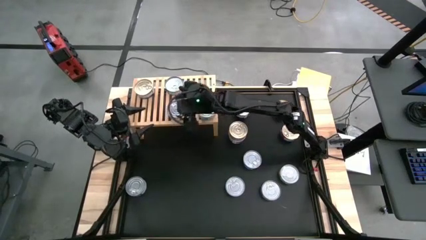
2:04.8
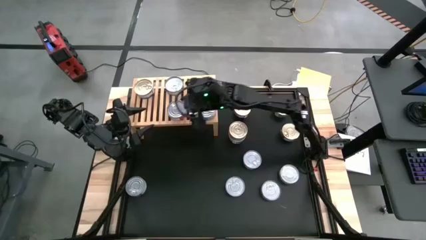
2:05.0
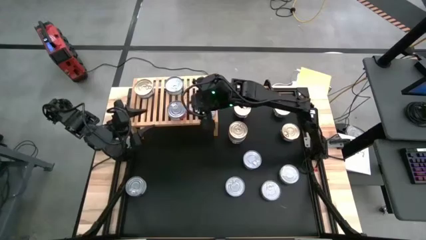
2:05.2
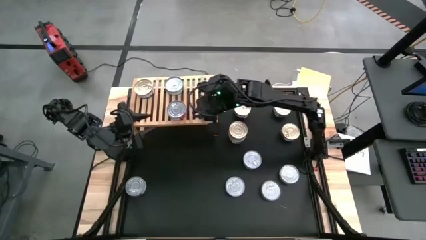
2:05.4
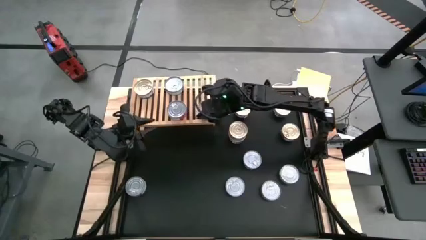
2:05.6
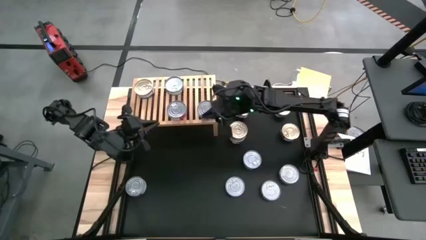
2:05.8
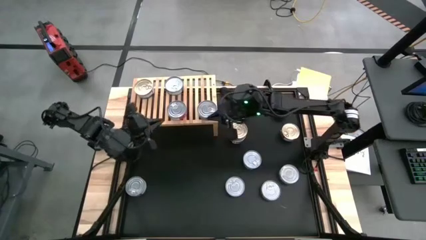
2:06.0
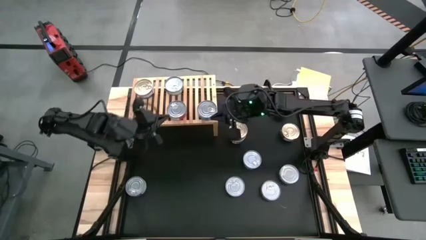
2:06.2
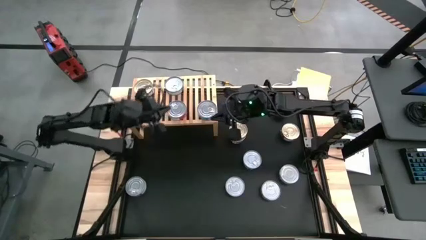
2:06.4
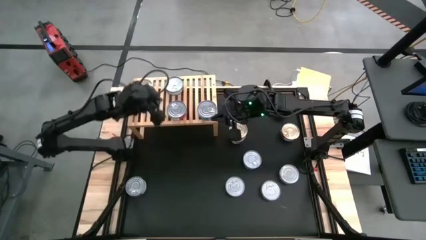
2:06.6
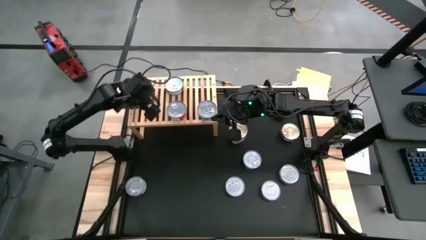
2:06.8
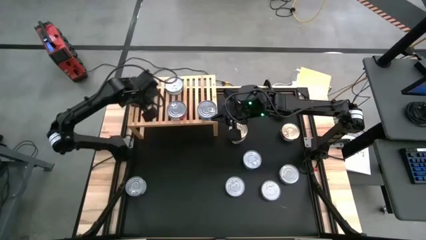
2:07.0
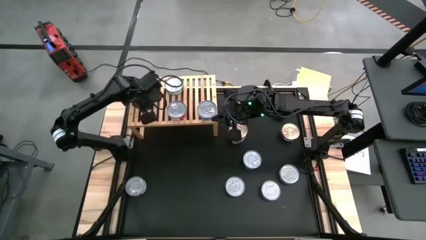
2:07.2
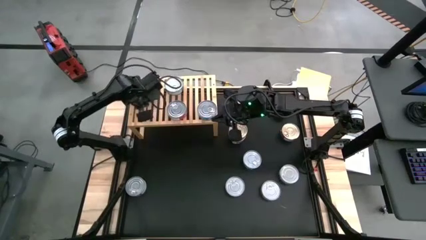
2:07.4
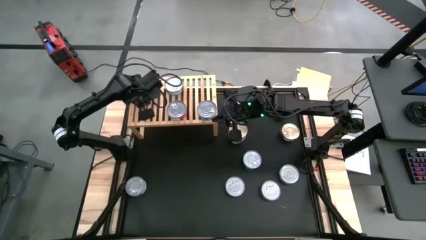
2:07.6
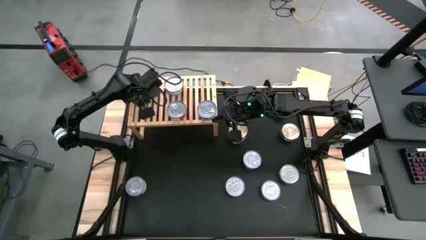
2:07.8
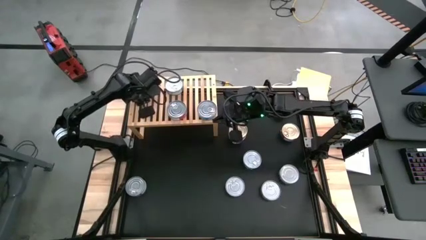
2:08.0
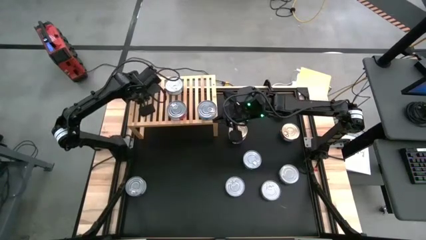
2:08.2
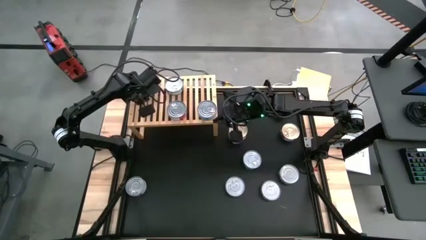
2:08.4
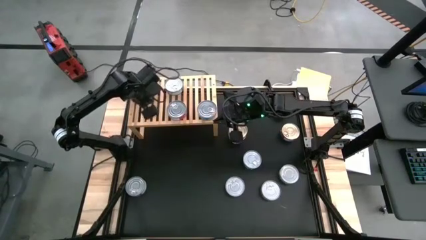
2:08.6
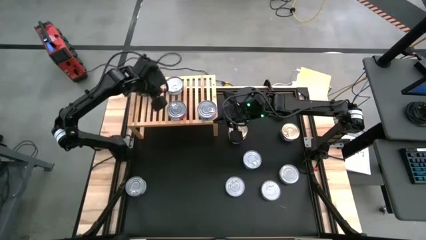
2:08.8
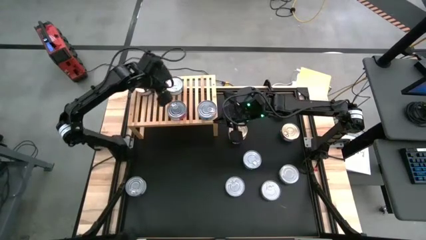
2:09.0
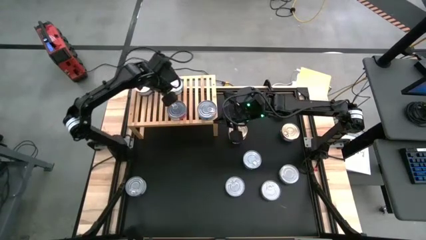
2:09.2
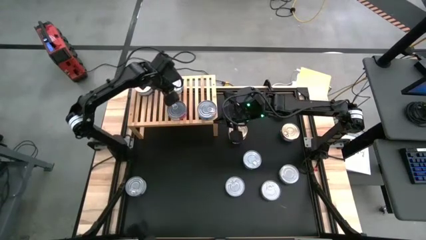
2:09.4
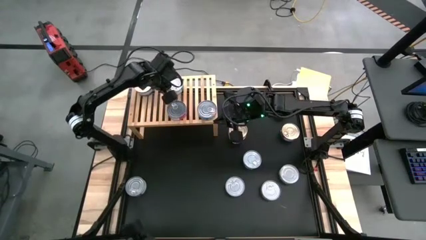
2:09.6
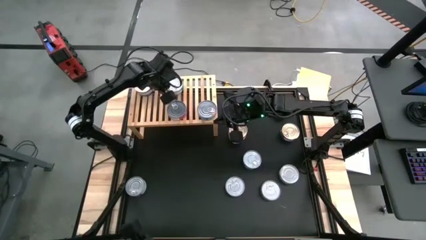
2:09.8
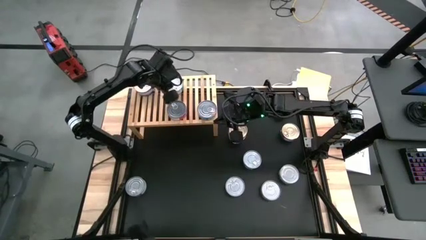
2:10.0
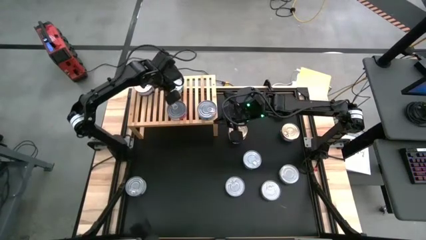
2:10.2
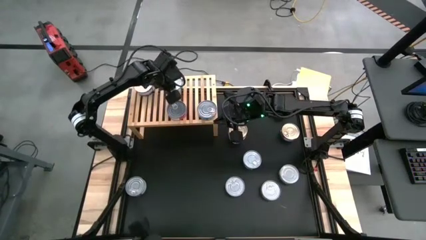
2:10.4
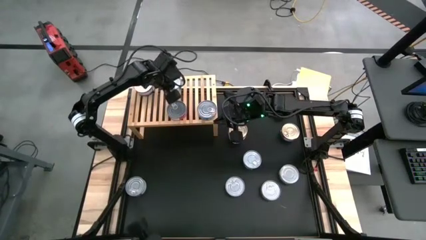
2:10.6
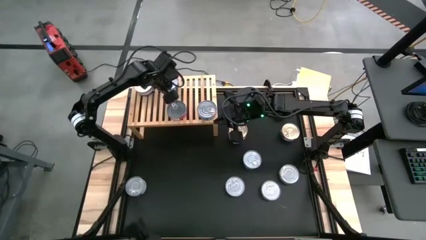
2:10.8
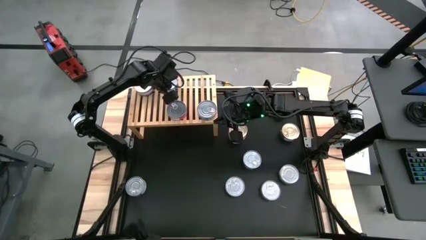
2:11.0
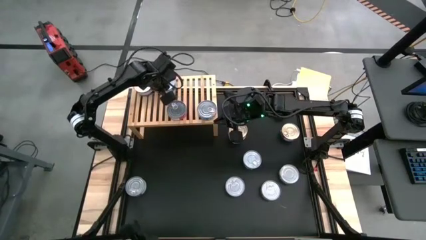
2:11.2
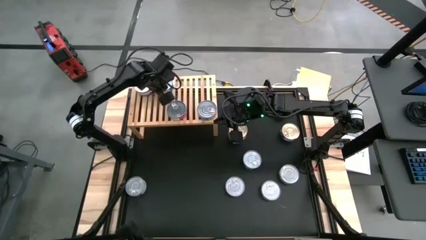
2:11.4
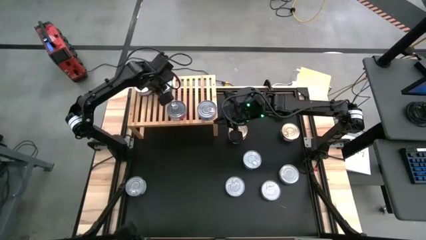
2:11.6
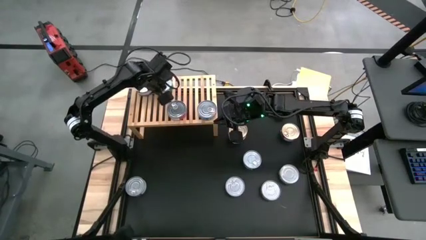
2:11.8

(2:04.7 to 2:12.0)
Task: Stack canned seafood by type on shelf
Adjust the cans on the shelf

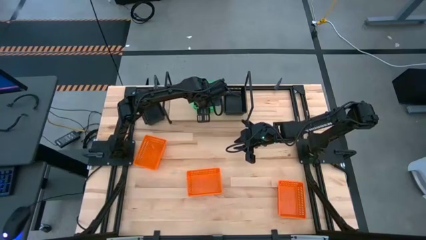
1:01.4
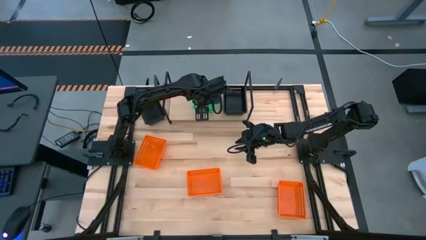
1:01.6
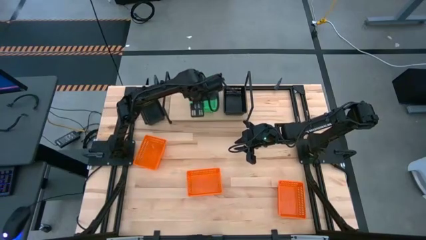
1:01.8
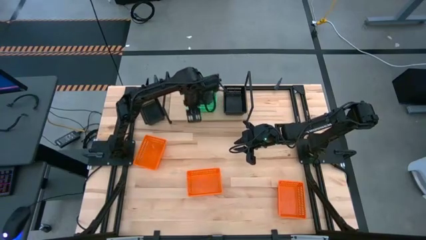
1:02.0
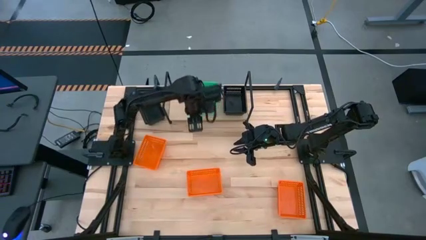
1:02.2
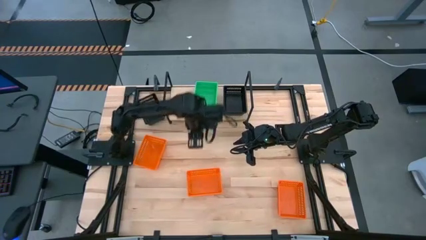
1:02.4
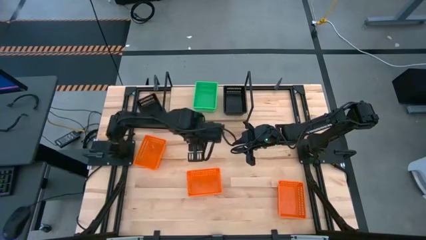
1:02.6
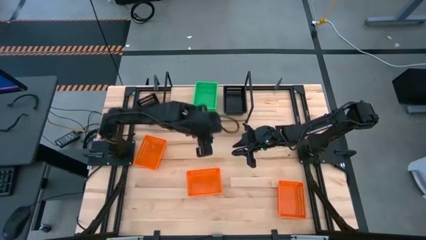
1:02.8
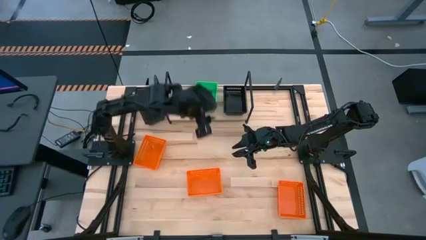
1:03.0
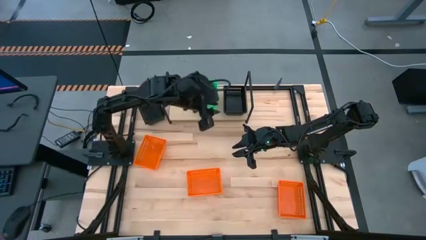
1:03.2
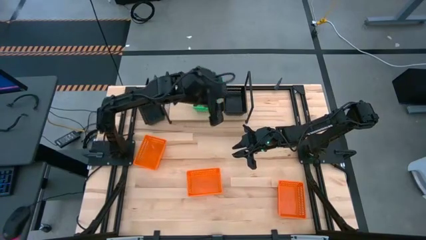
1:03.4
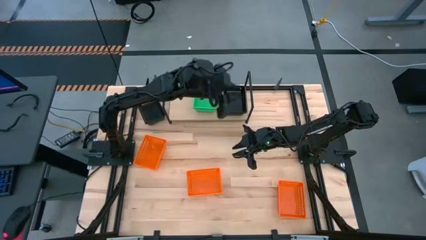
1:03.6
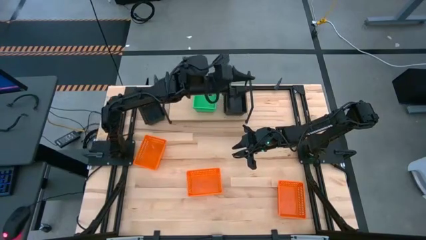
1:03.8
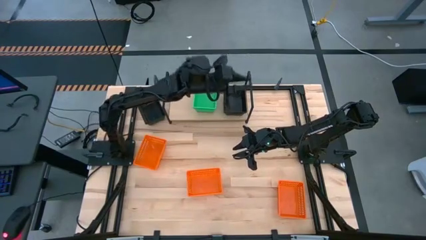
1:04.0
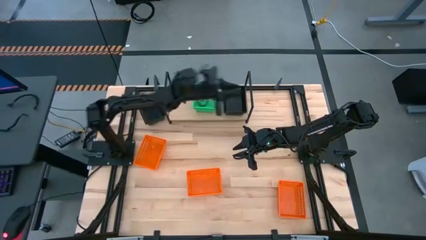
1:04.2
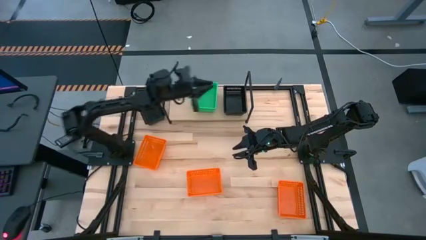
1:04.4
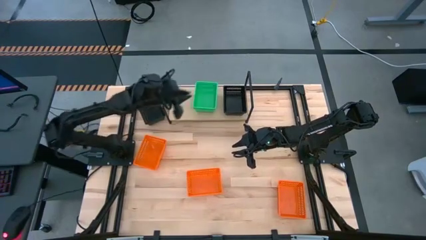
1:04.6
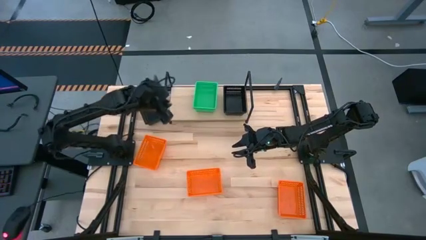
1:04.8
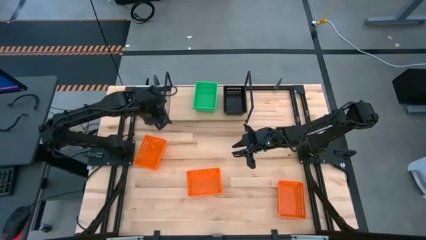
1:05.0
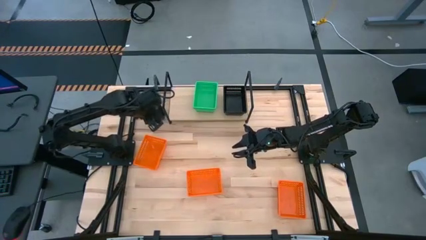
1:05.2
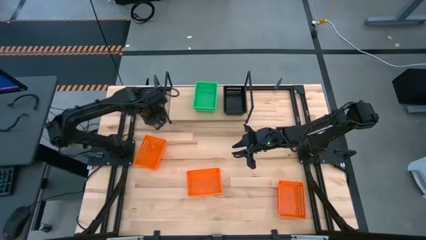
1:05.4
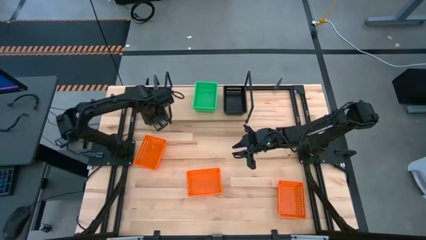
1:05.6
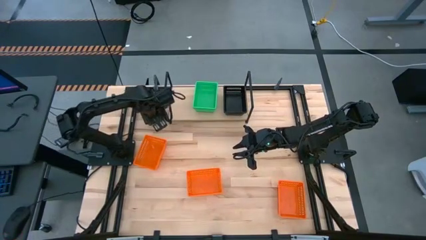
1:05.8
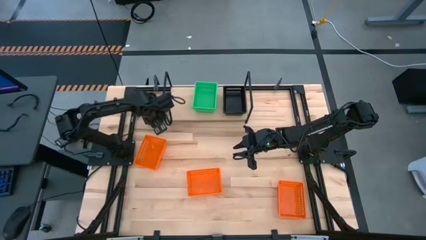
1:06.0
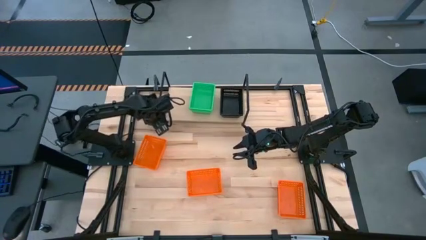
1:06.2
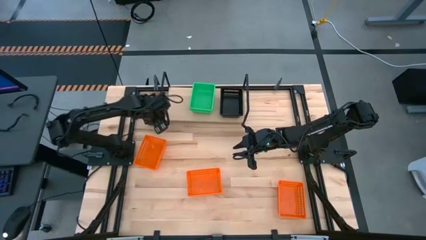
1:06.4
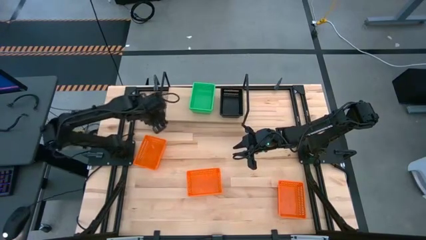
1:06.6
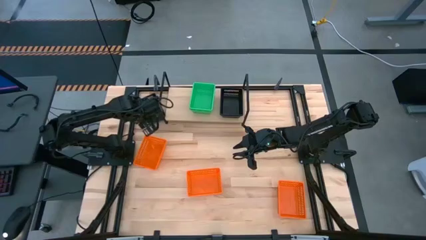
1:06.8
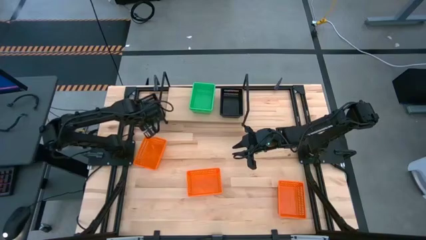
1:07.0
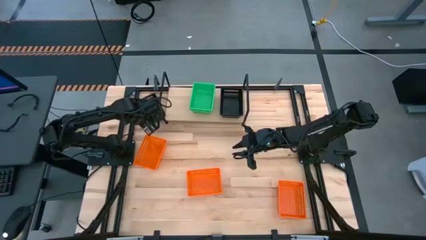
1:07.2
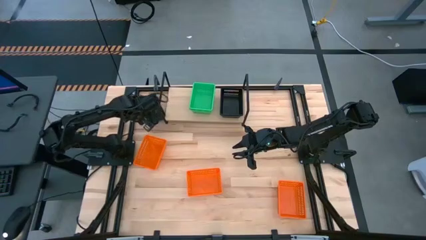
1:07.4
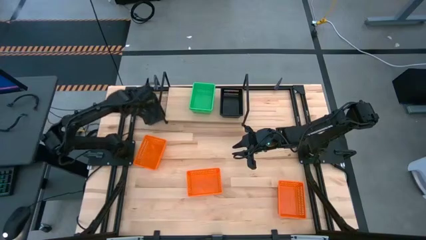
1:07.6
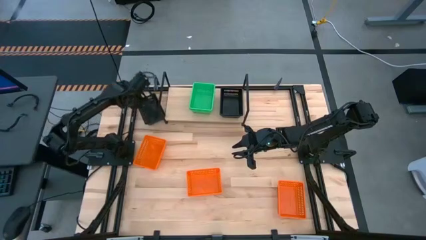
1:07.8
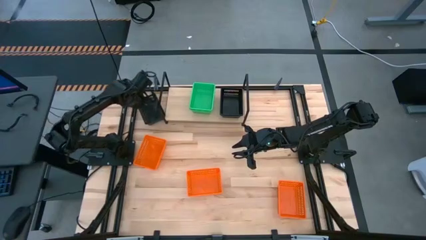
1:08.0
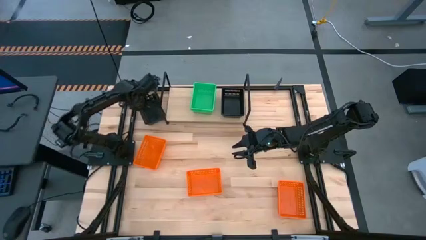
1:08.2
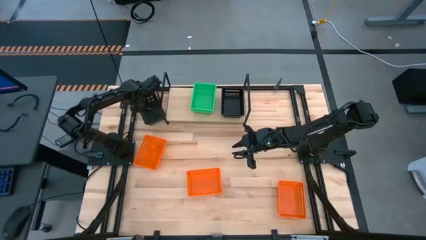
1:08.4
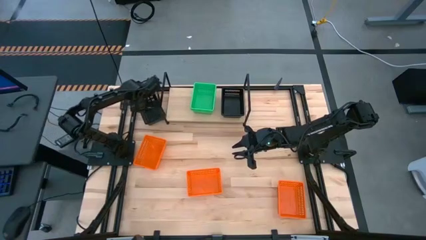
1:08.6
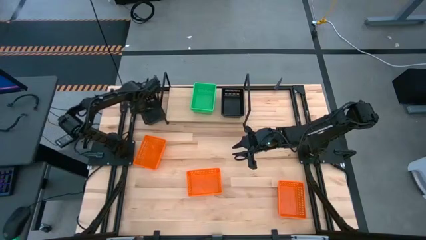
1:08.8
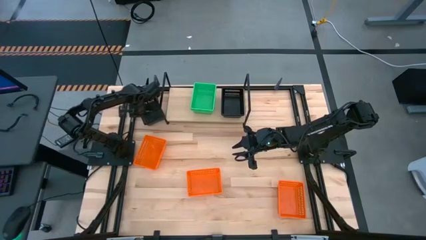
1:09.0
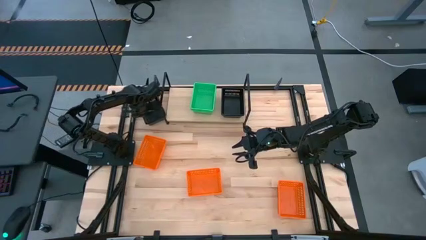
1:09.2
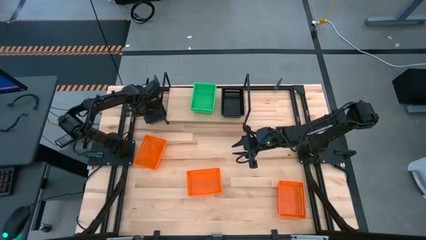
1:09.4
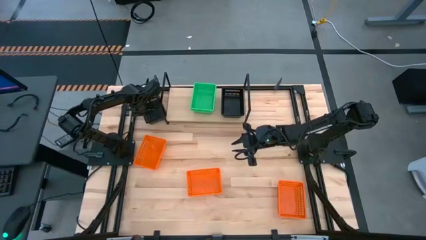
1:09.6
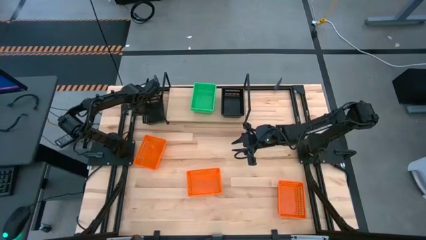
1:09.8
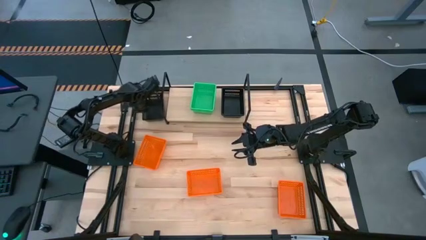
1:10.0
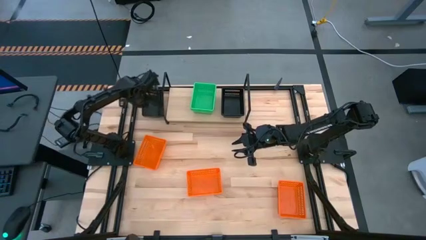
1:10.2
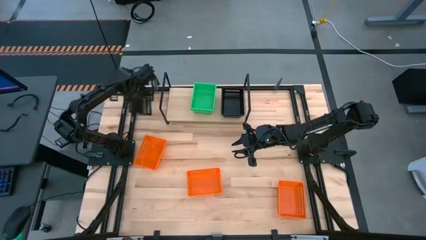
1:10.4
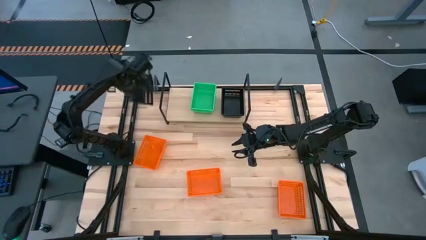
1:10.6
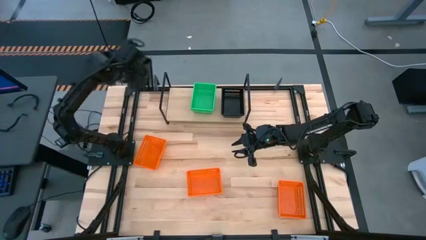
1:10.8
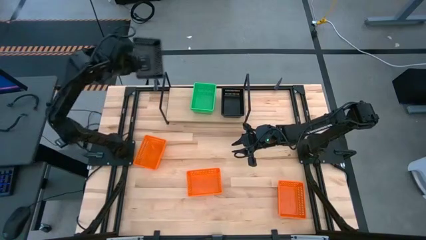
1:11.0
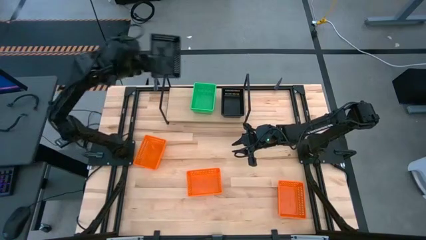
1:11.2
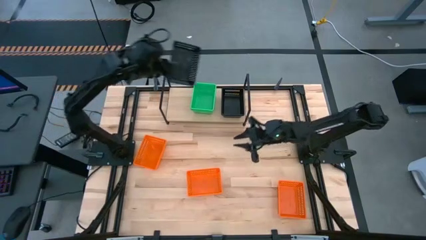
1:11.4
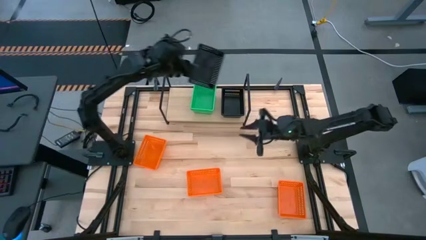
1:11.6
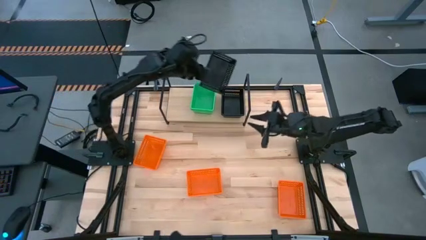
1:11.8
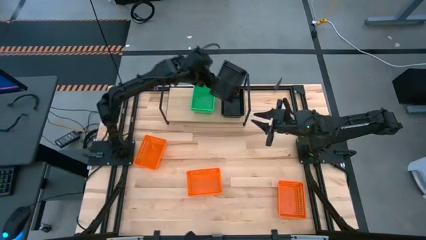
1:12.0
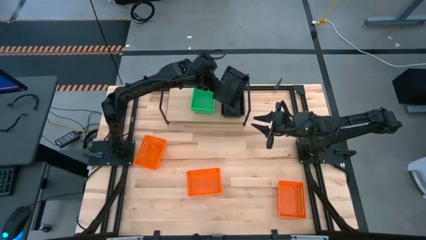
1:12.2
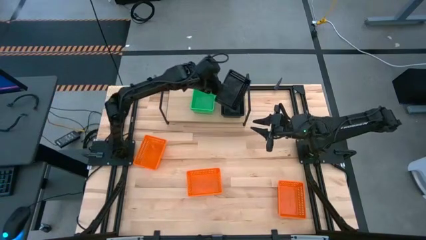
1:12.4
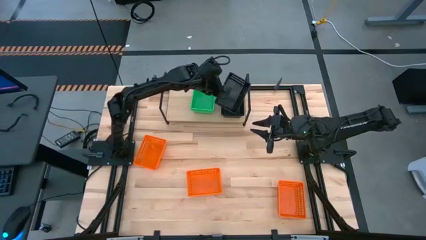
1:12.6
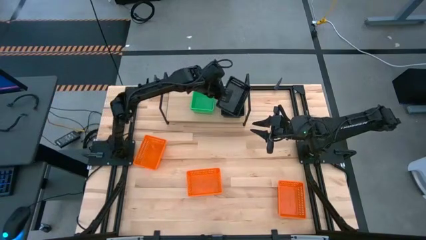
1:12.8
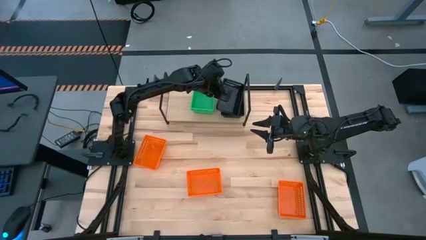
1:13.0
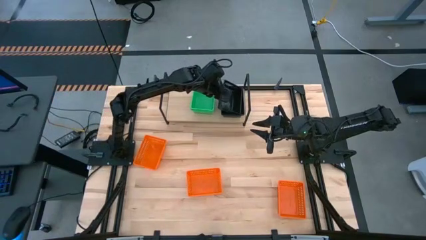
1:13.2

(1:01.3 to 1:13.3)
Task: Stack baskets on shelf by color
Stack the black bin on top of the stacked black bin on the shelf
